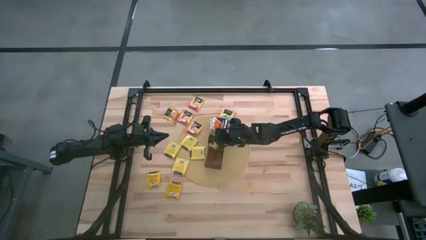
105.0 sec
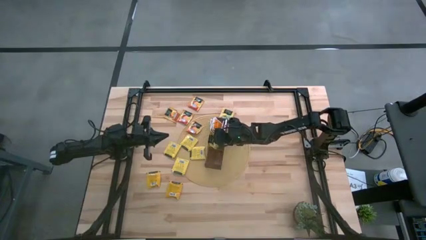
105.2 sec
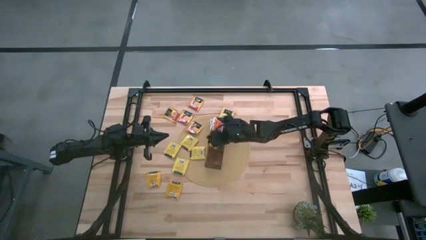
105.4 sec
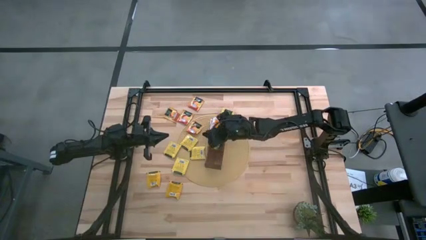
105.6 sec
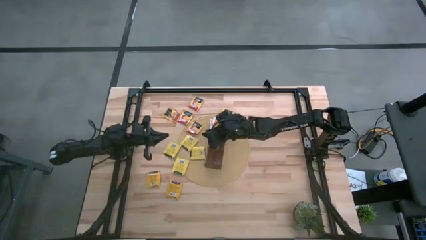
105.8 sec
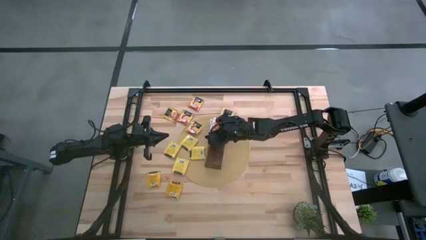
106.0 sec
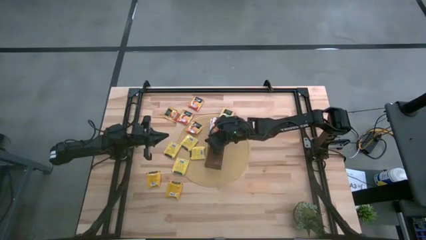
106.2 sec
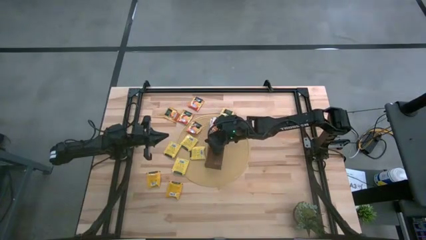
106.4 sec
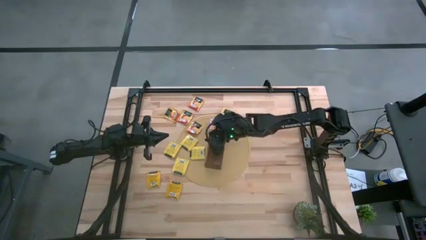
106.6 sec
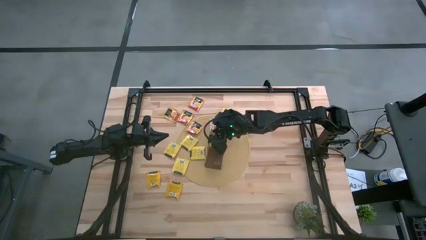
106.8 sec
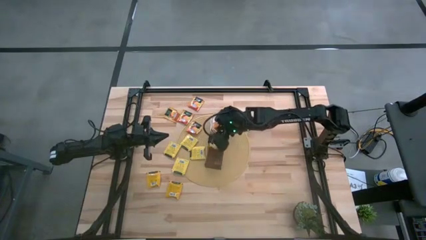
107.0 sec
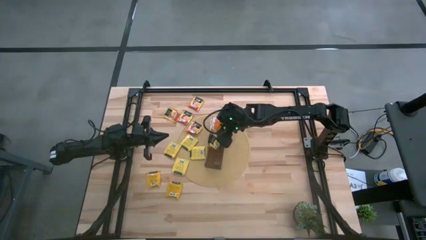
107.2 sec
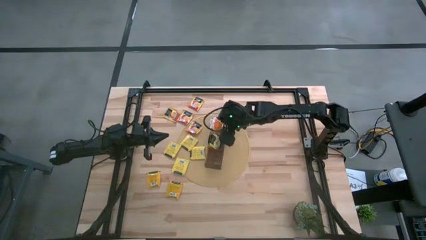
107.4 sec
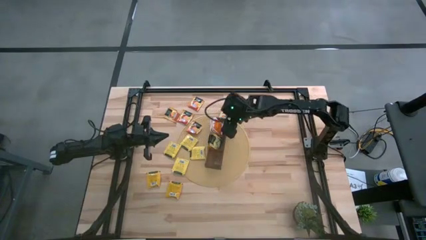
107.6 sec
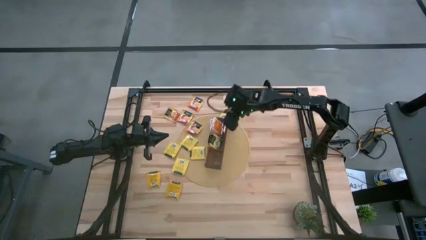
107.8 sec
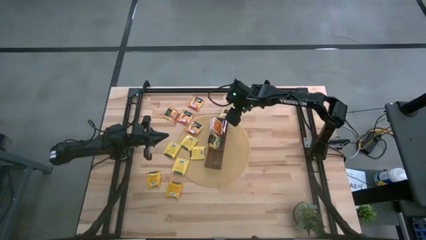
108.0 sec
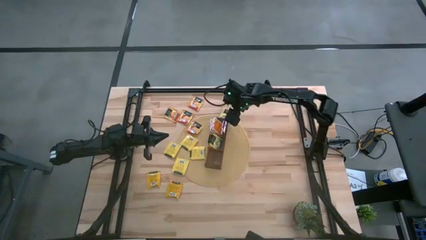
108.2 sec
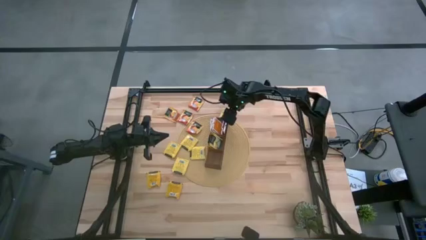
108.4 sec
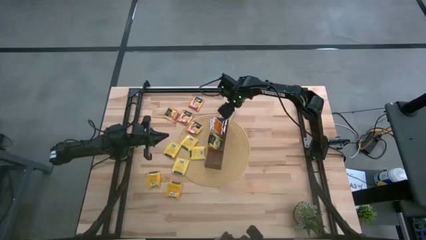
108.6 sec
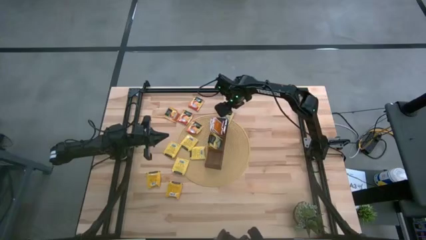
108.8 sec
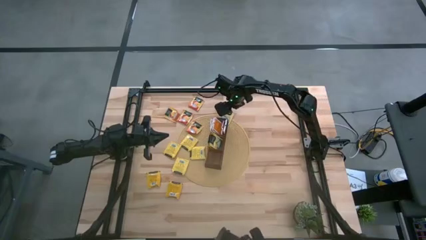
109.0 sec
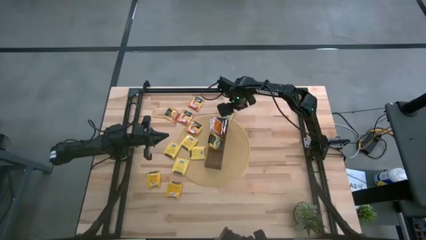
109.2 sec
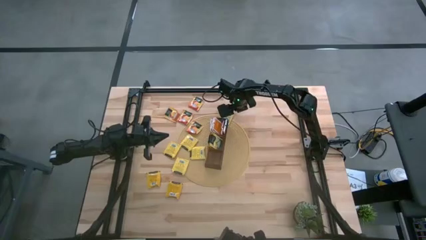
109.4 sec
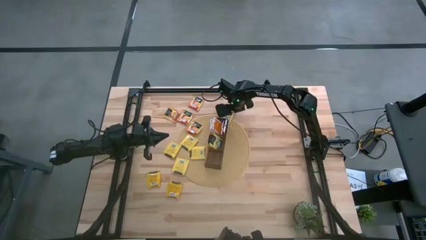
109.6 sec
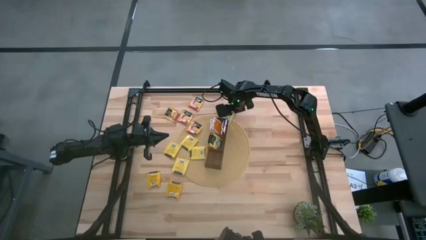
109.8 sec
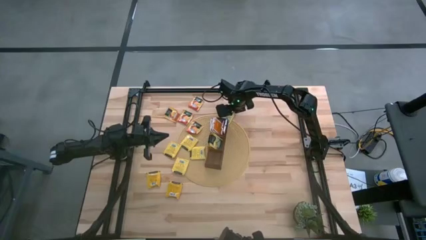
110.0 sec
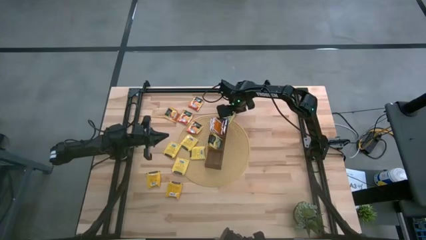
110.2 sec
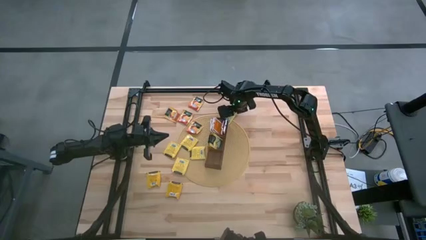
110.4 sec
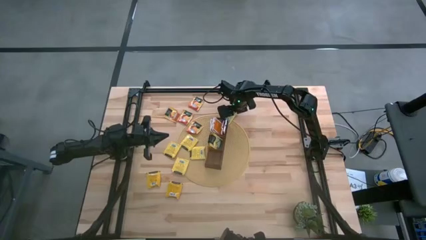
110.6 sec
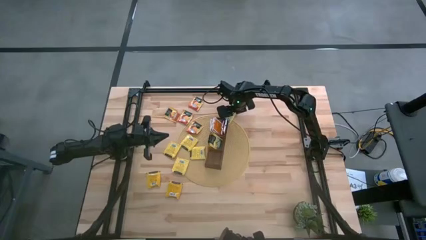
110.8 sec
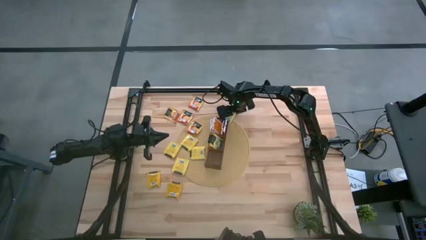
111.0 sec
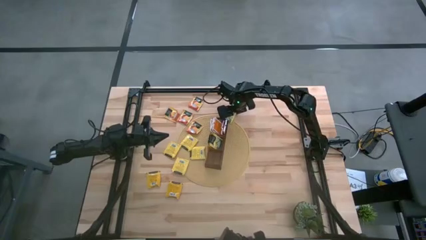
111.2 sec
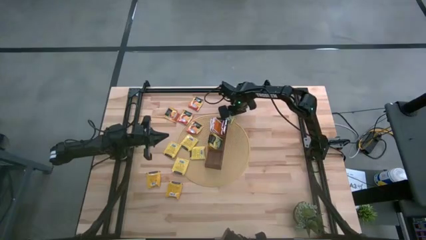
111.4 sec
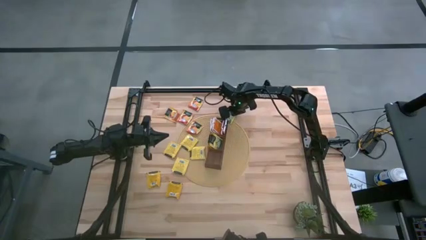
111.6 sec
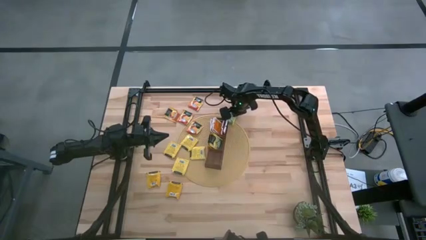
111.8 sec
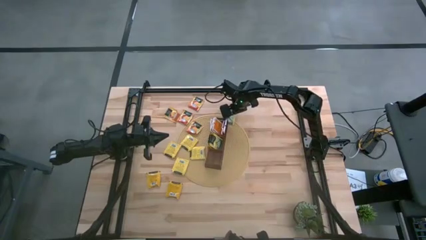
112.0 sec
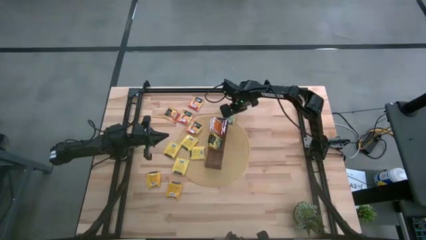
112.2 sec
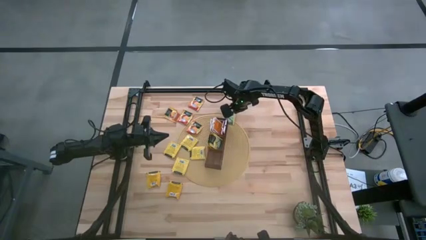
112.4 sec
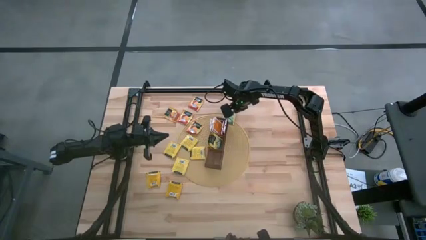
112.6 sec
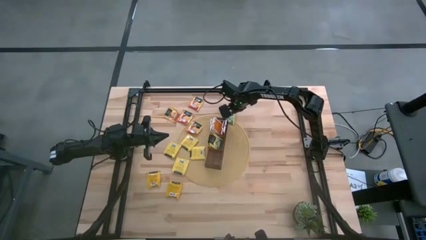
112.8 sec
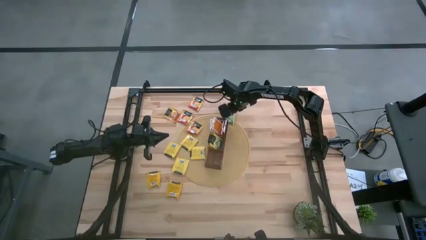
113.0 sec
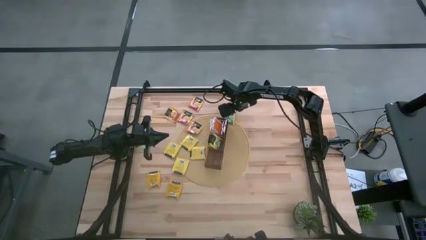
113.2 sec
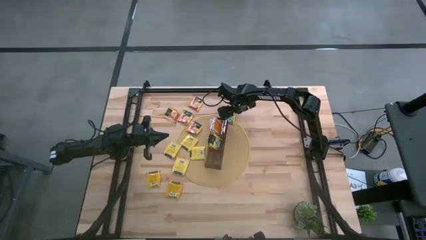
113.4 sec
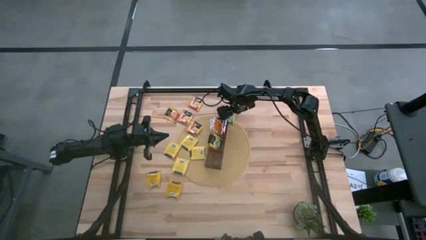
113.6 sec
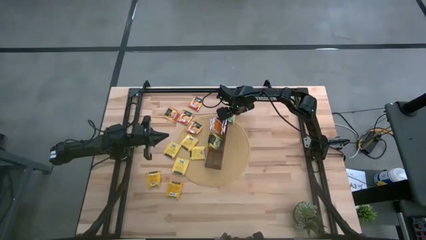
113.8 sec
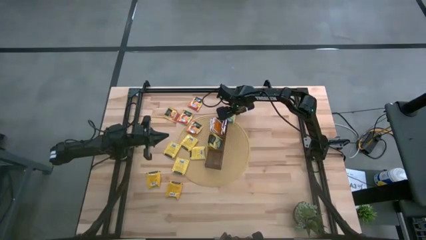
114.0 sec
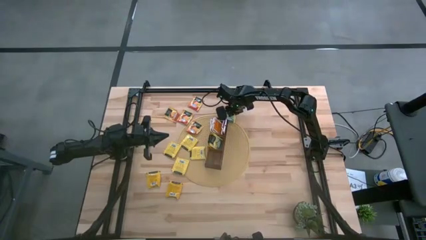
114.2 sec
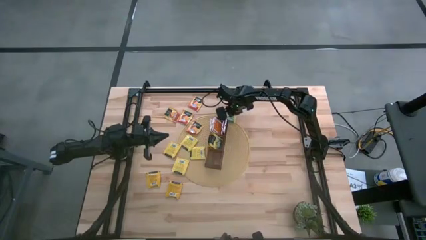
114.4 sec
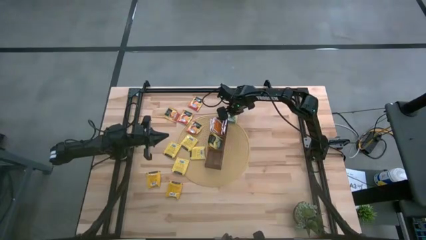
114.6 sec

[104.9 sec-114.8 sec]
Task: Pick & Place Tea
Put the yellow tea bag into the middle section of the wooden organizer

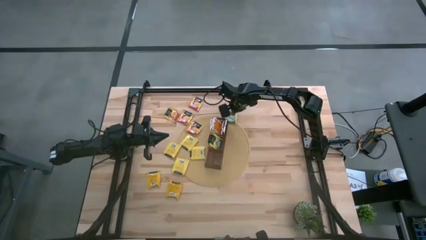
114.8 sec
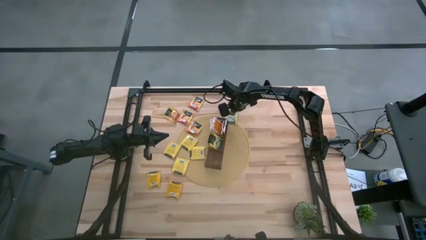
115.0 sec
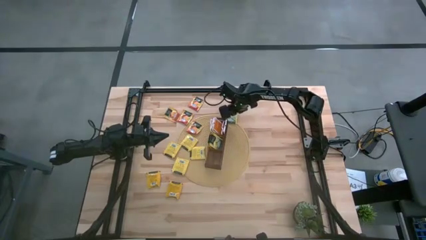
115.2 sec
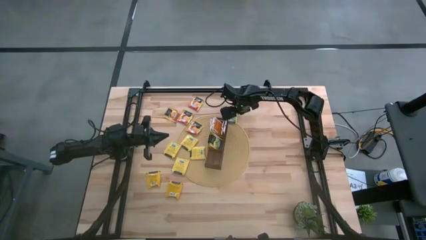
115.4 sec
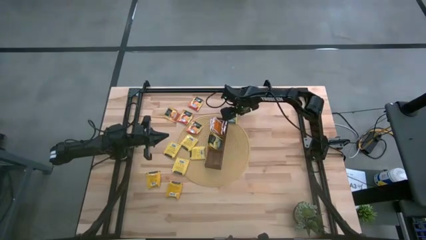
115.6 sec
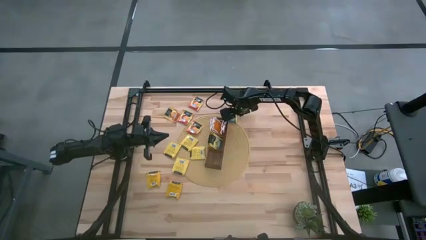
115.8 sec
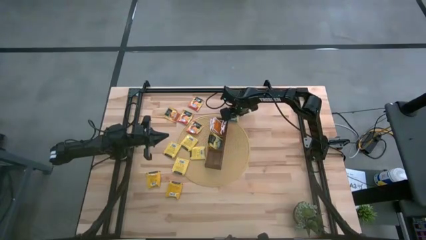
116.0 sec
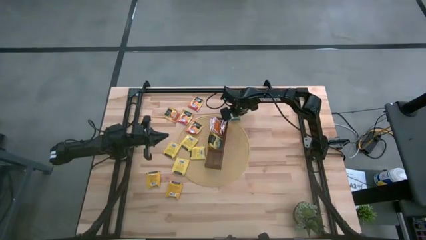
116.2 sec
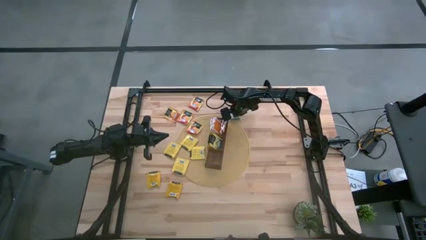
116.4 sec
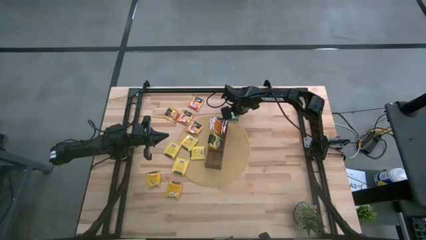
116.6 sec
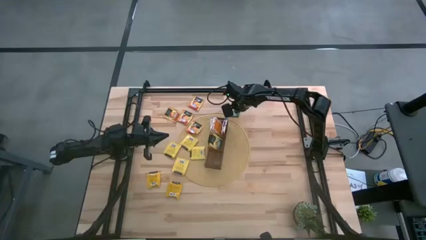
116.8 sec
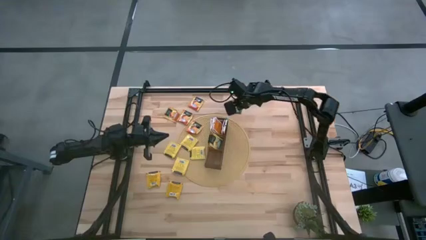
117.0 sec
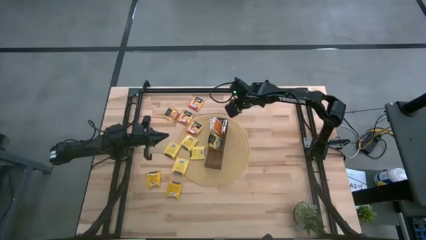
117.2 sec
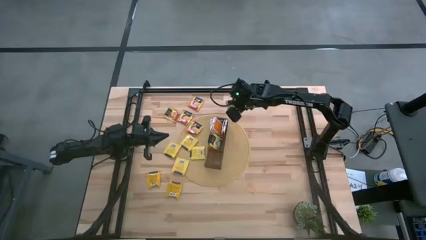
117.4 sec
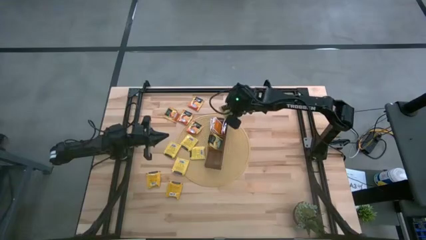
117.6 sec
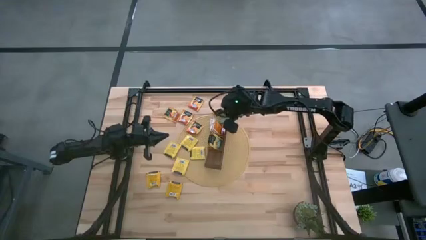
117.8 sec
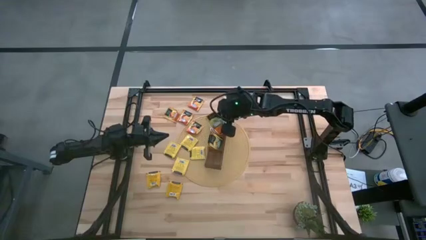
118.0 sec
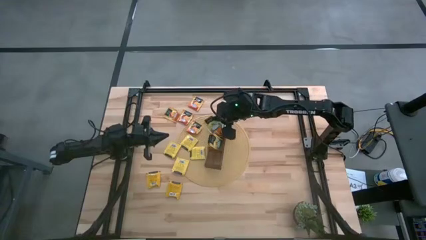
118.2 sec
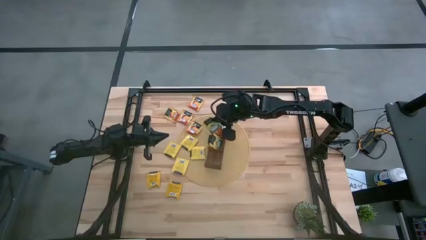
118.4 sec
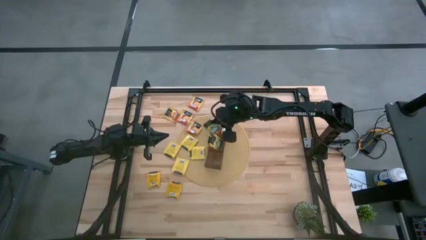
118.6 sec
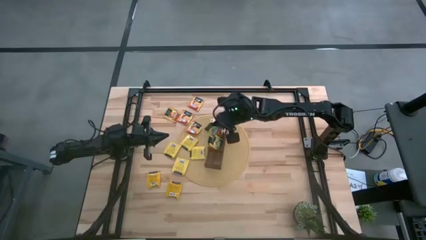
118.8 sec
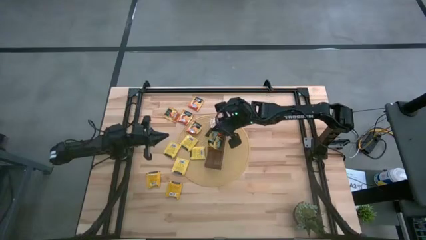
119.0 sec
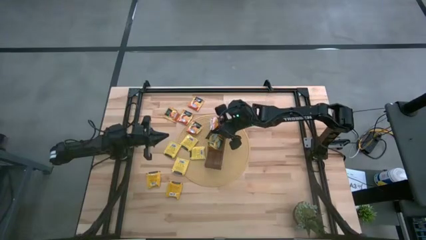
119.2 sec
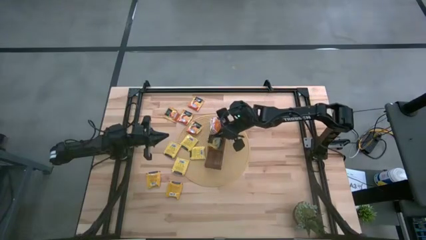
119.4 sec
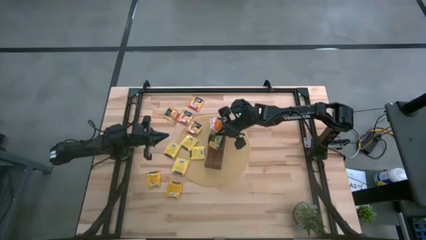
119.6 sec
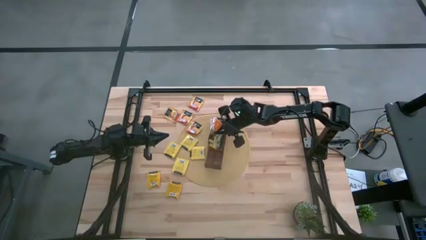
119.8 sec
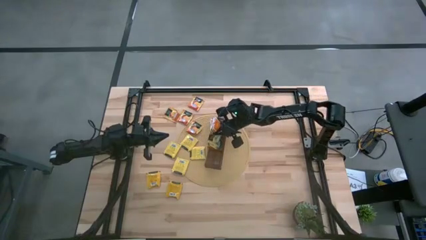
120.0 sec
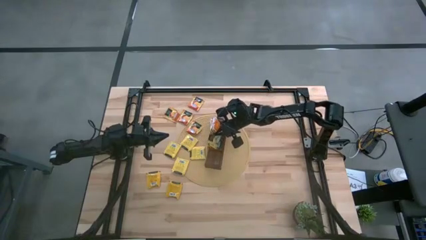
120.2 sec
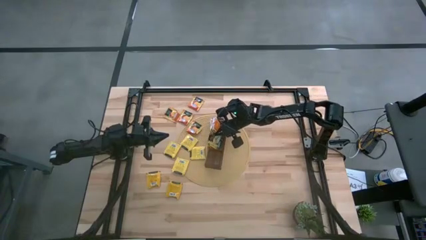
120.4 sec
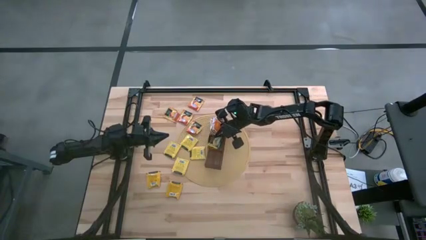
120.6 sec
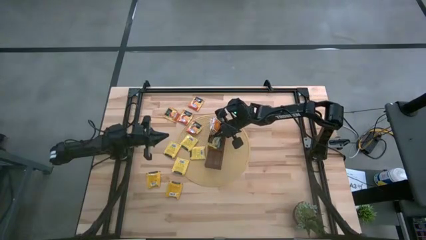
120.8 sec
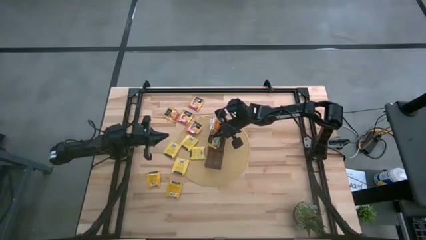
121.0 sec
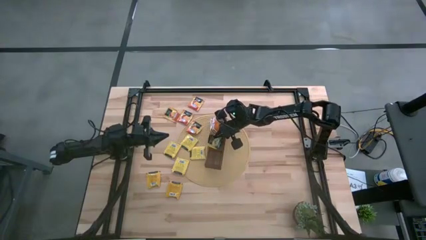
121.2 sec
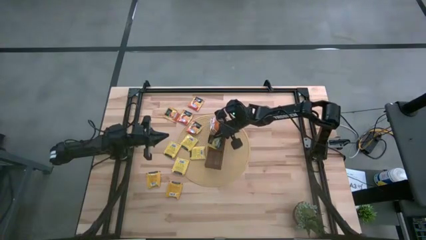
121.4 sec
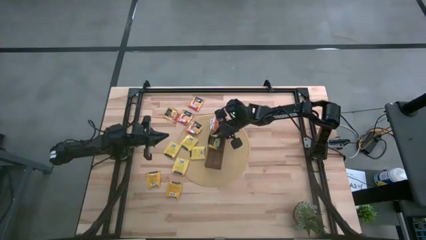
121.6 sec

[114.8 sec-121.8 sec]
Put the yellow tea bag into the middle section of the wooden organizer
